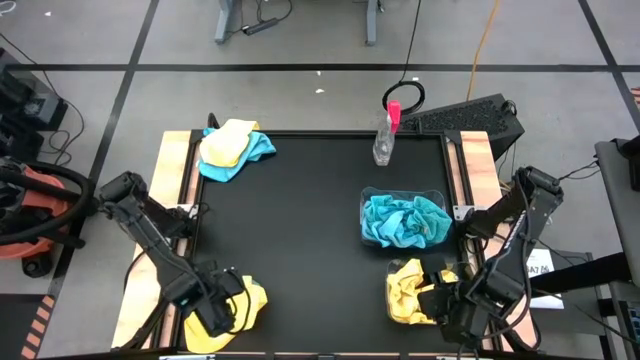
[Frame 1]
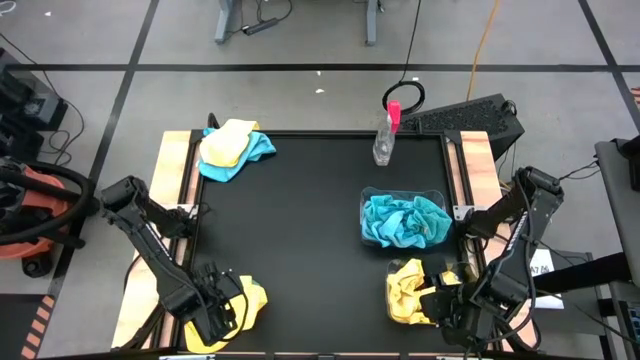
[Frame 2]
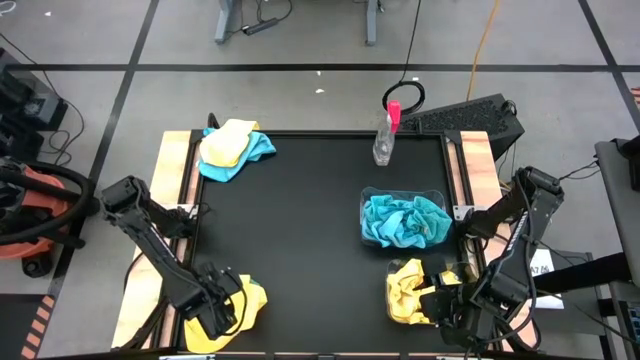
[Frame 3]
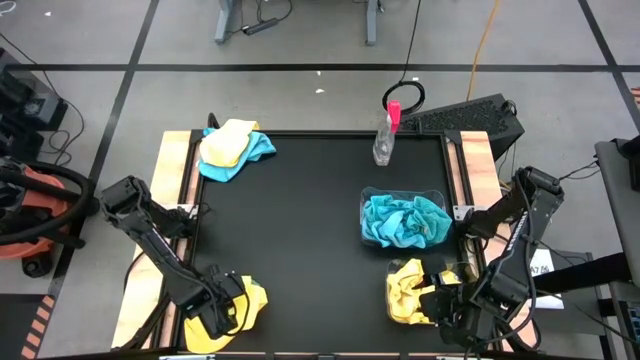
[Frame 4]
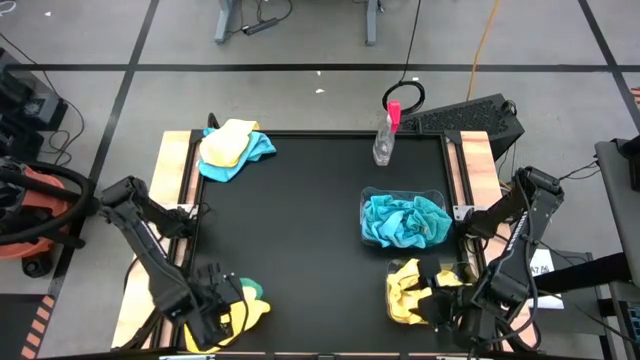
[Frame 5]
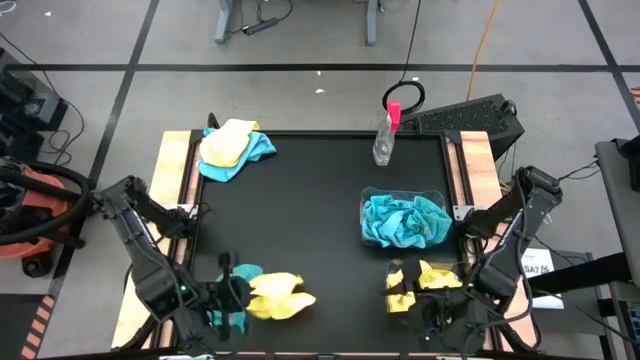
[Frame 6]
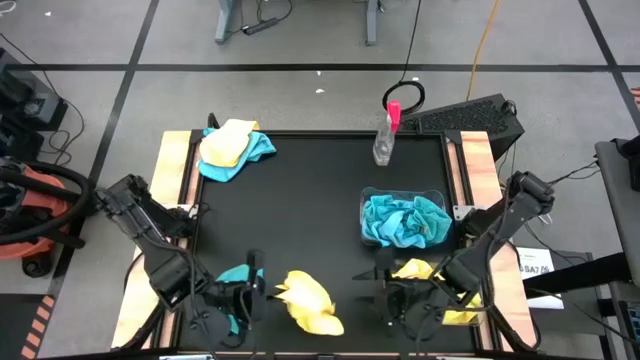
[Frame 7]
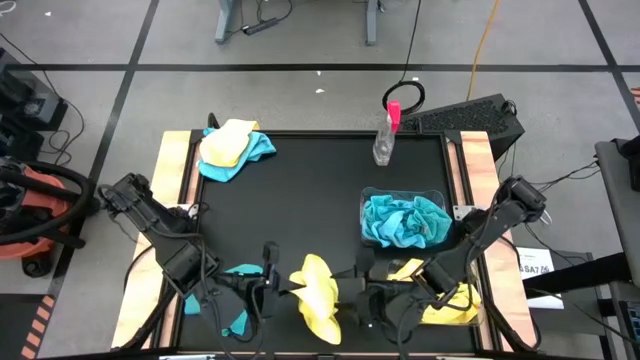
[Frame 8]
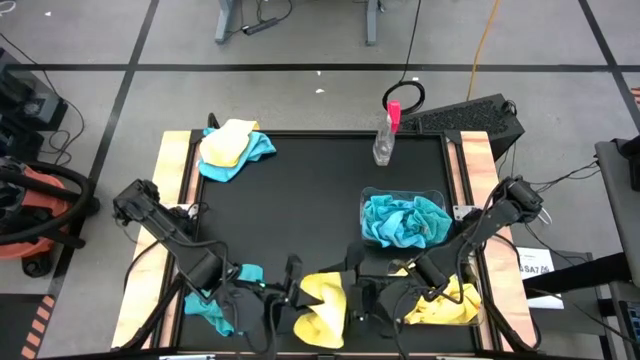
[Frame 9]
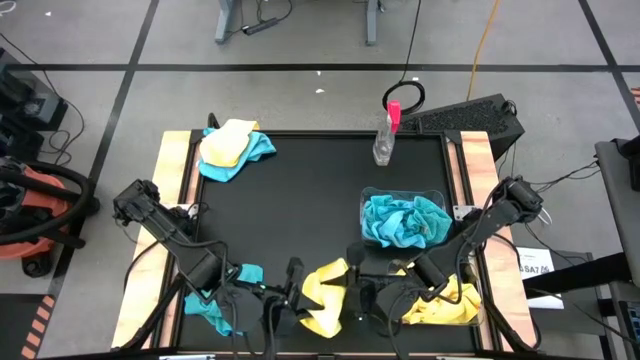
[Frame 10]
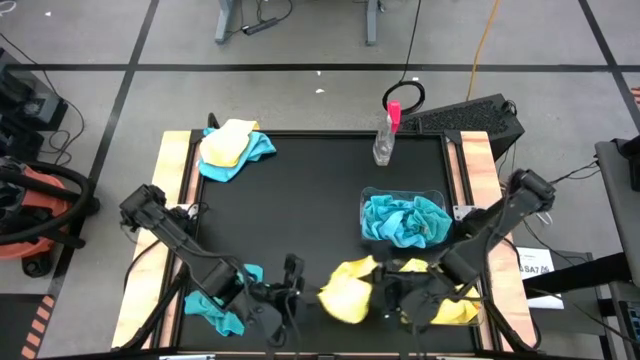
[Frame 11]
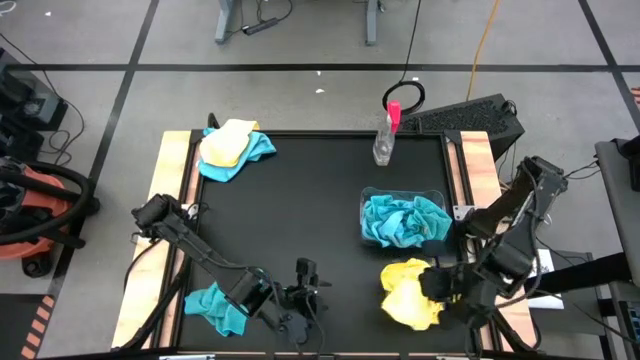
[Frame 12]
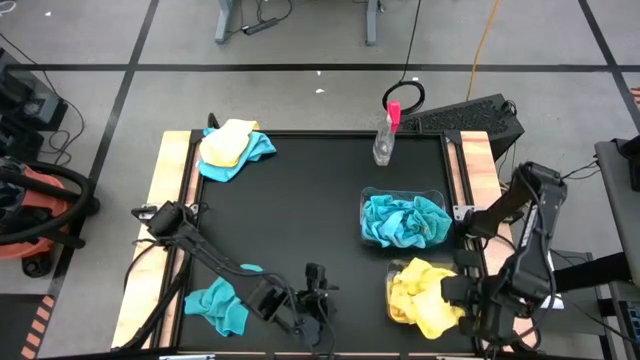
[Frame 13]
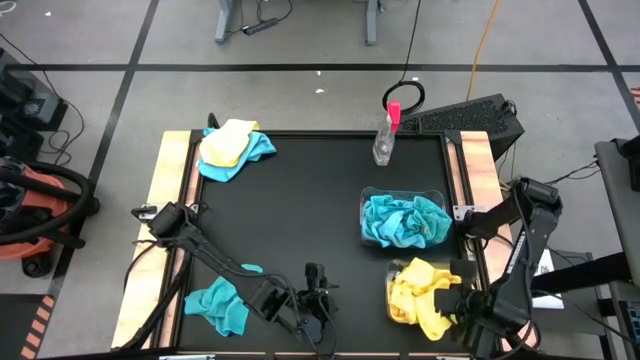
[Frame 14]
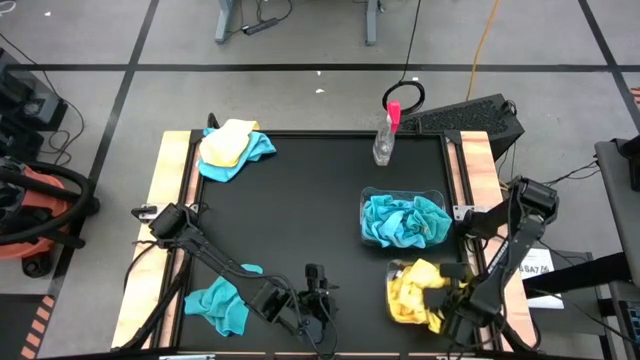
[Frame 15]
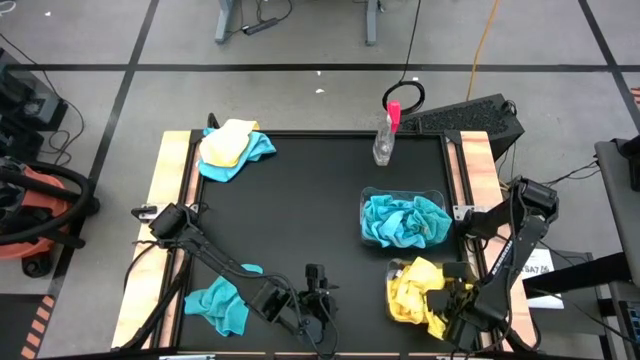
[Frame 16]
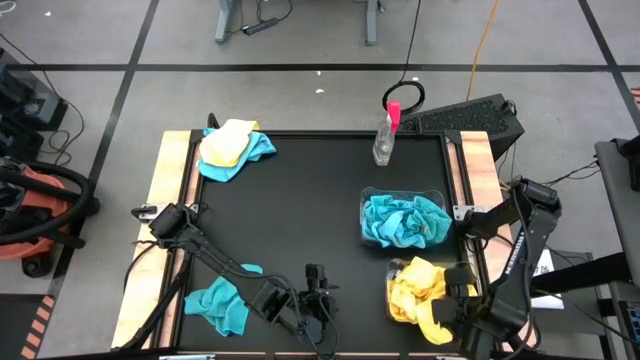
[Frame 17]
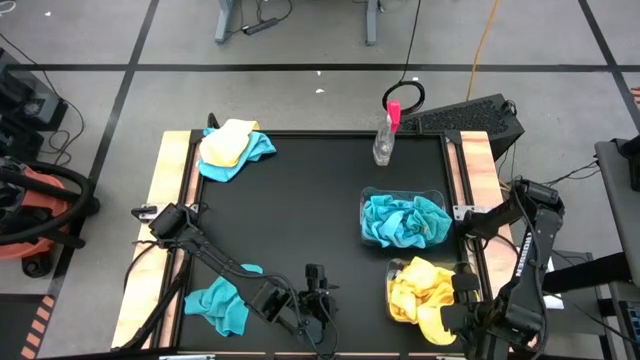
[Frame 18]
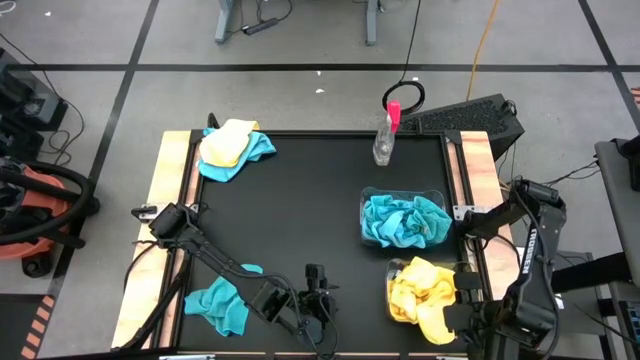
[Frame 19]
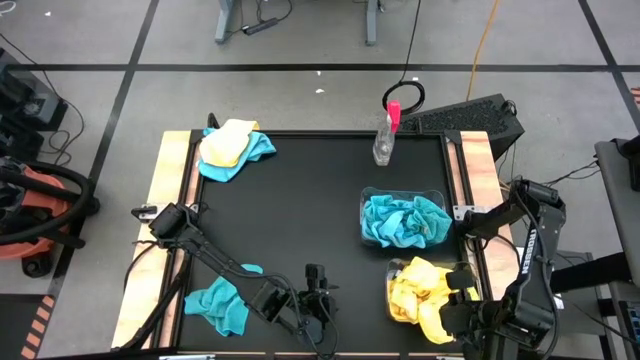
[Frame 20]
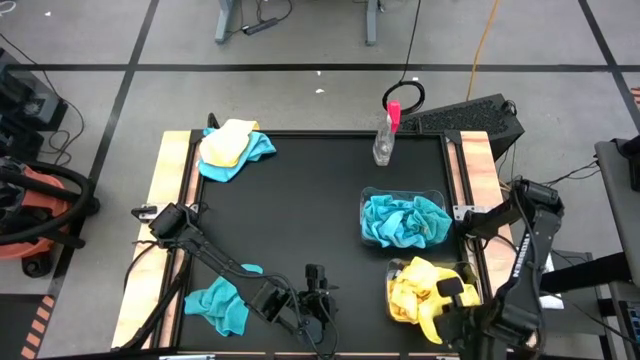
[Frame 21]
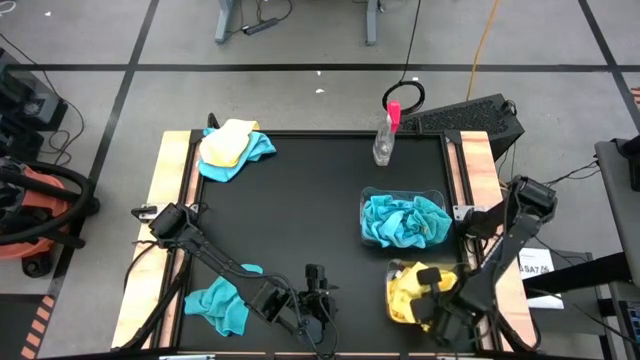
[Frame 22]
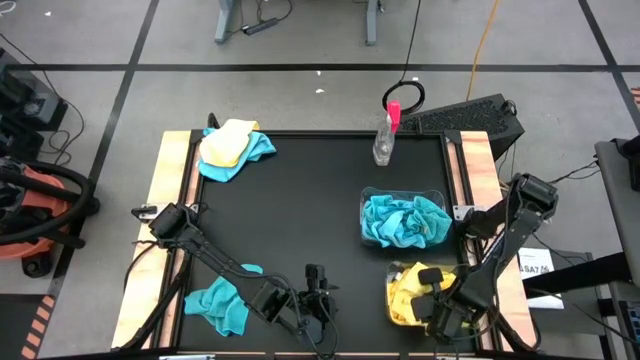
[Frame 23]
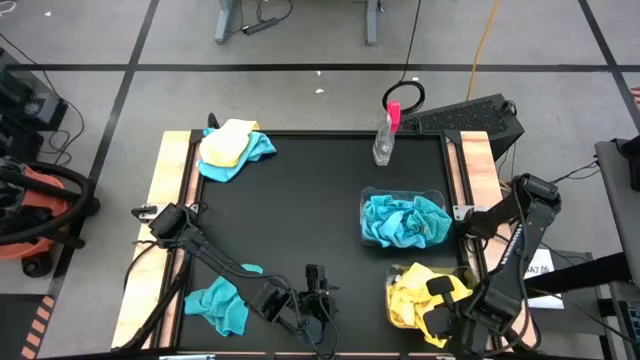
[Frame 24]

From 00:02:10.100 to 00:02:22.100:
Task: Sort microfiber towel by color & place in baskets
Put the yellow towel into the bottom transparent bin

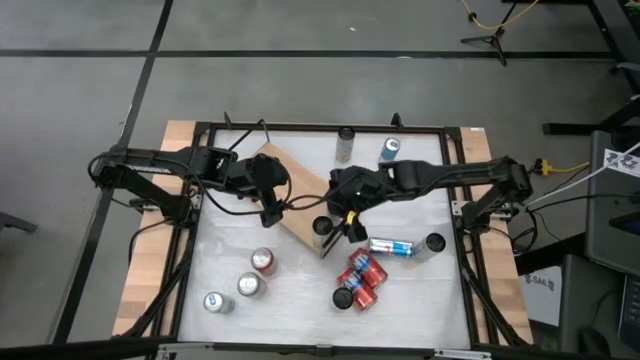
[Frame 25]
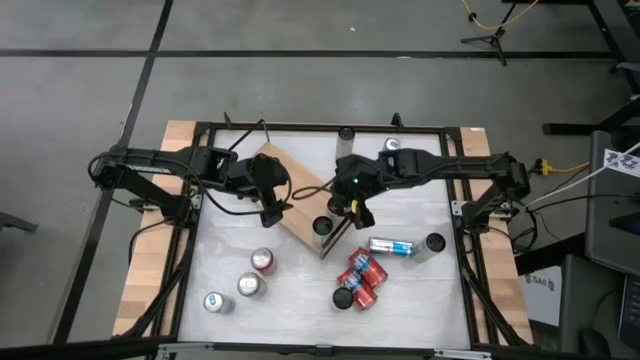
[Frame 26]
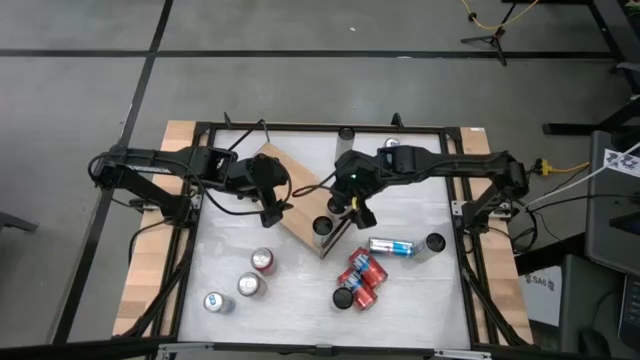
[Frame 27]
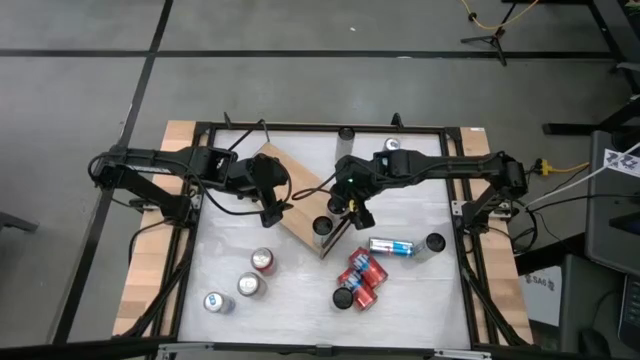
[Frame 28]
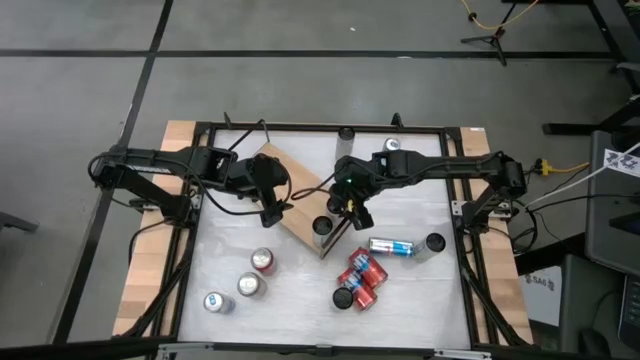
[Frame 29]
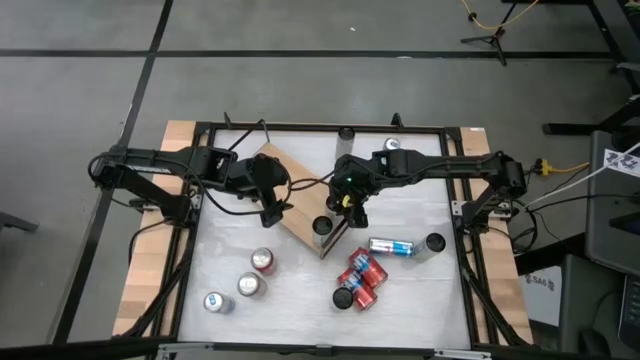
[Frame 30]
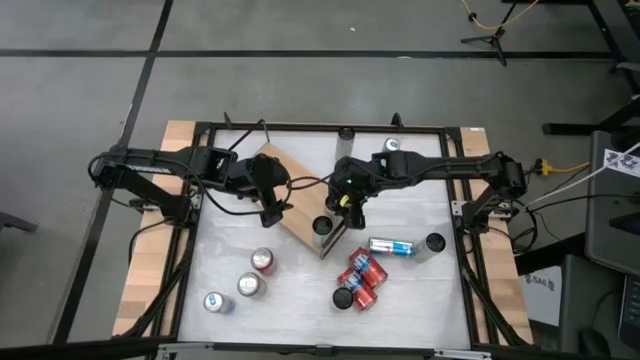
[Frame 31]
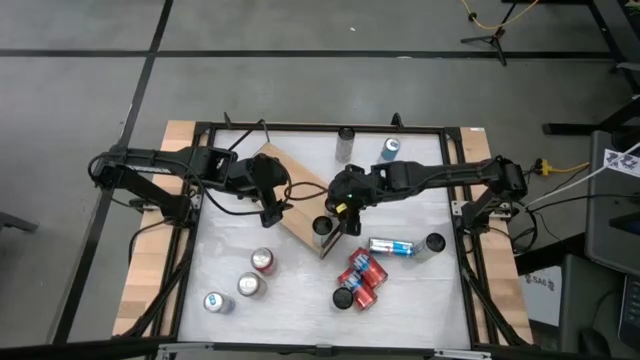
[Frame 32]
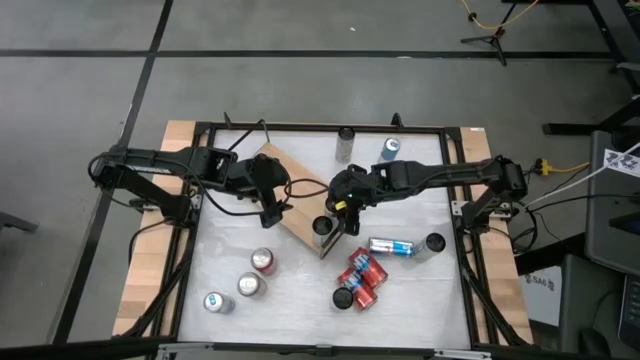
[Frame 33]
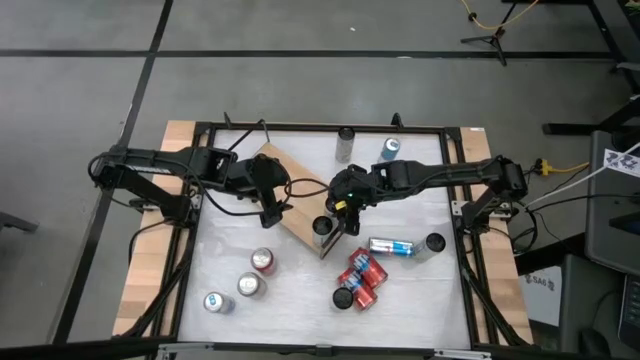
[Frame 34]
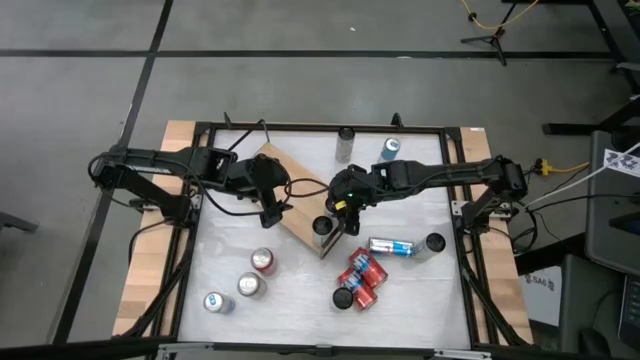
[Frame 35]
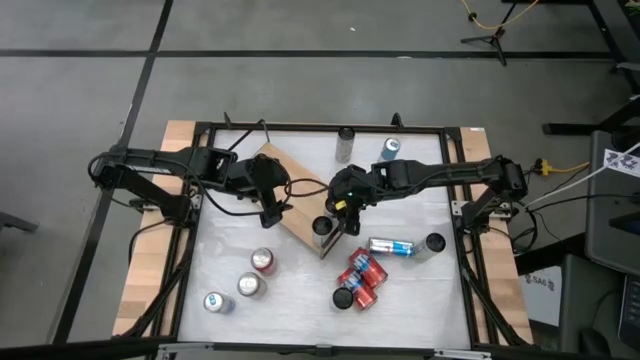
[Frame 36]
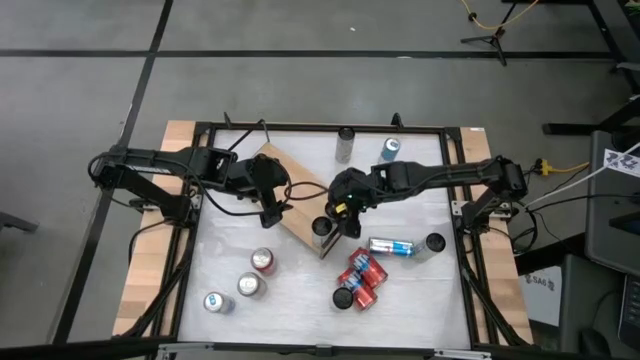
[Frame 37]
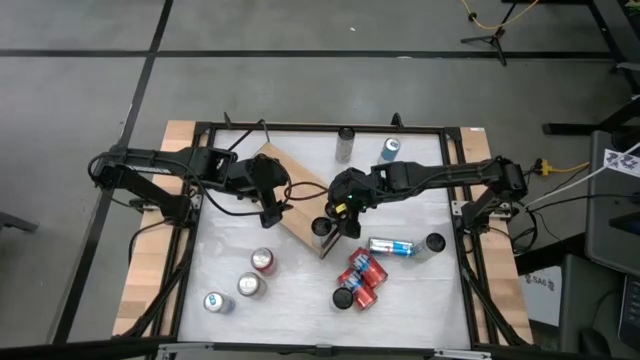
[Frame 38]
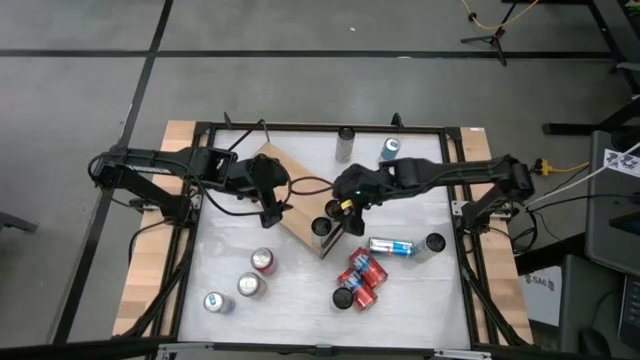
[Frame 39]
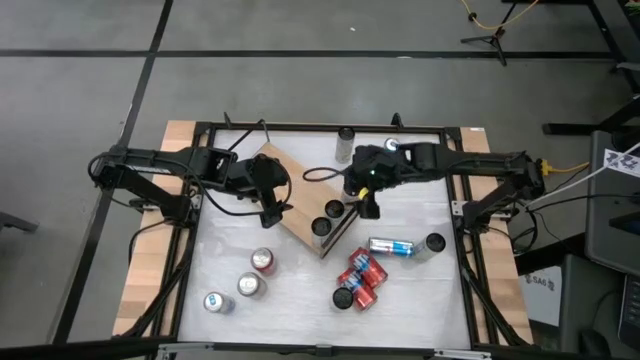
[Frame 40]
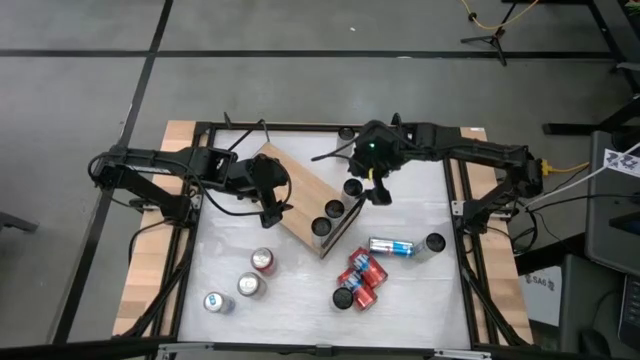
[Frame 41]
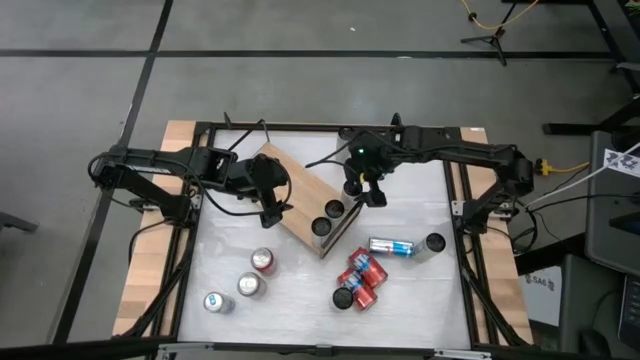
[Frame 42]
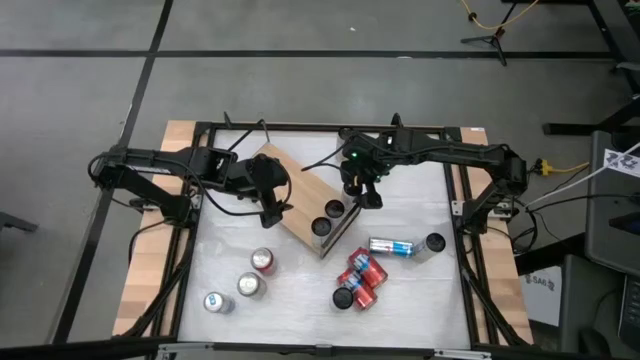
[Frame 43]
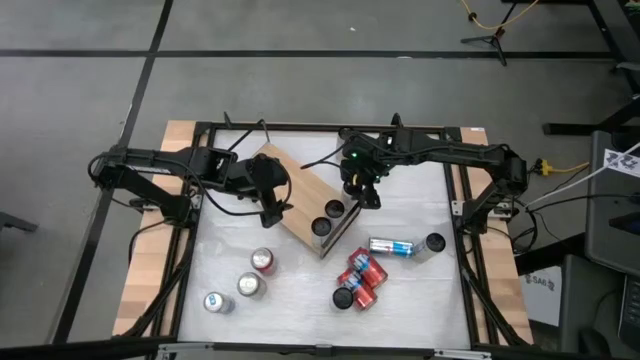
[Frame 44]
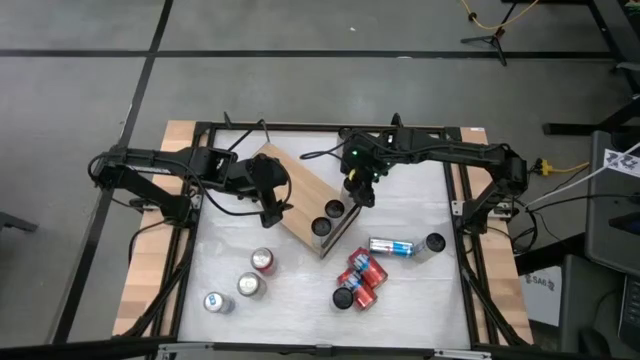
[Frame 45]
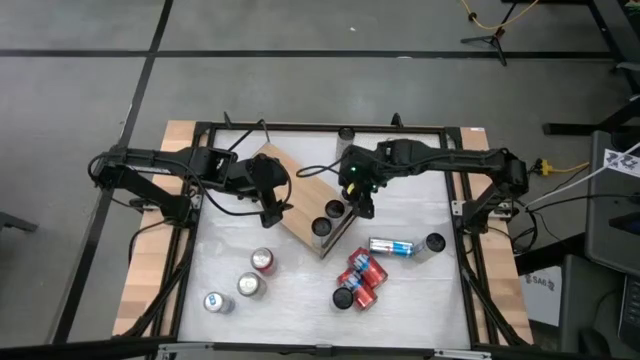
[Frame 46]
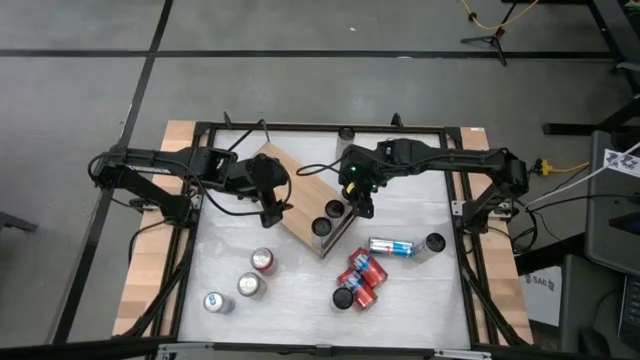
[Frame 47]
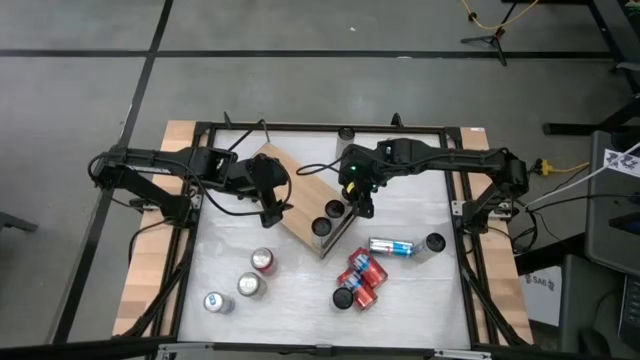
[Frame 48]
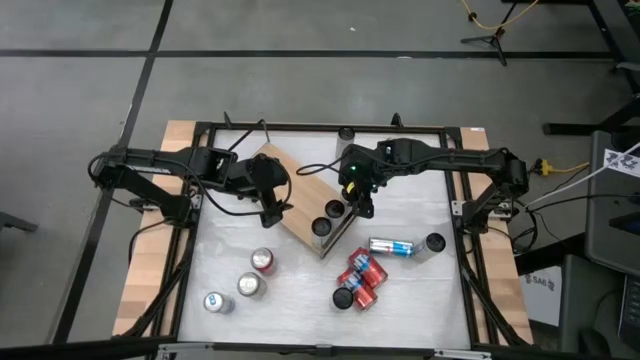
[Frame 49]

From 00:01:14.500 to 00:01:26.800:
Task: Place canned beverage on shelf
Adjust the white-pink soda cans on the shelf
